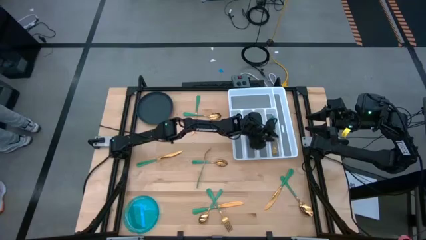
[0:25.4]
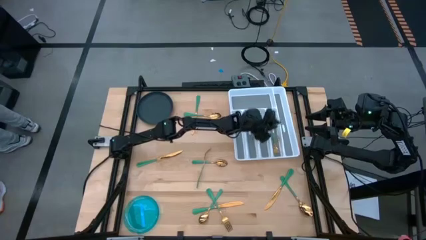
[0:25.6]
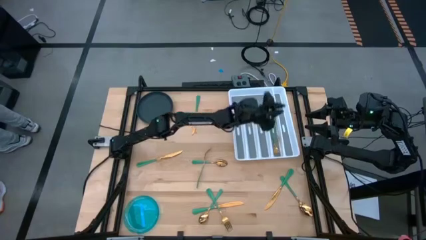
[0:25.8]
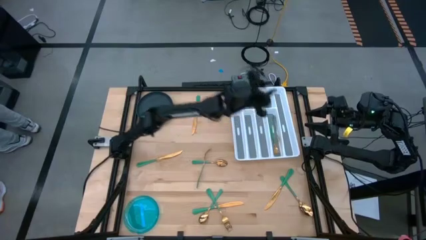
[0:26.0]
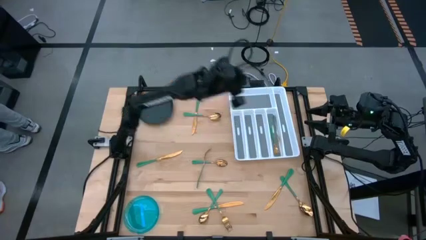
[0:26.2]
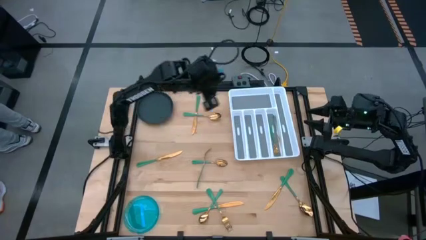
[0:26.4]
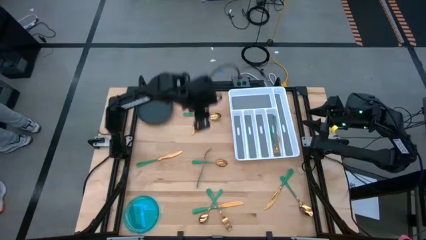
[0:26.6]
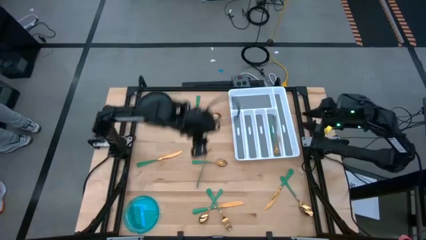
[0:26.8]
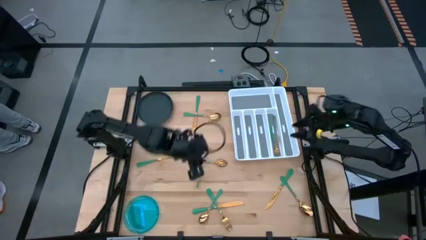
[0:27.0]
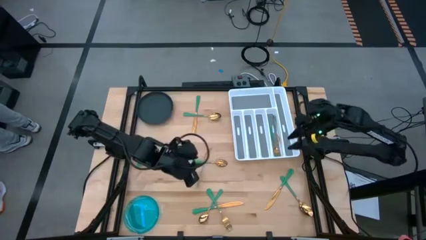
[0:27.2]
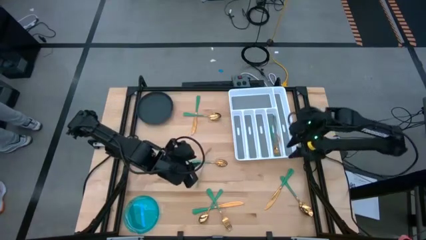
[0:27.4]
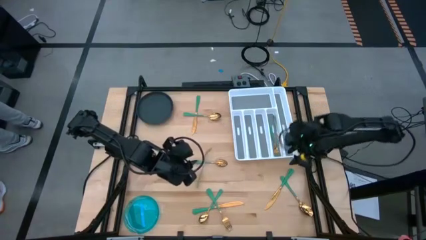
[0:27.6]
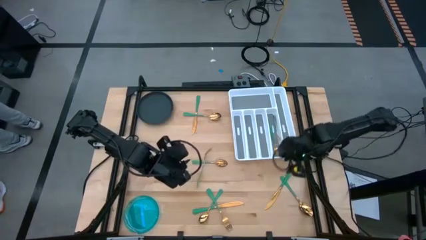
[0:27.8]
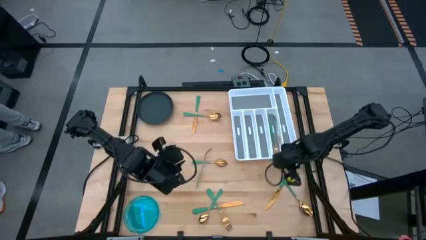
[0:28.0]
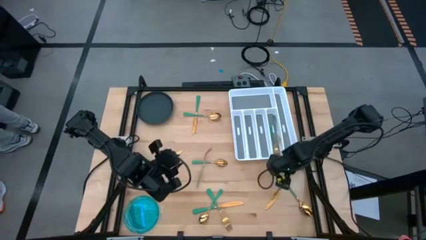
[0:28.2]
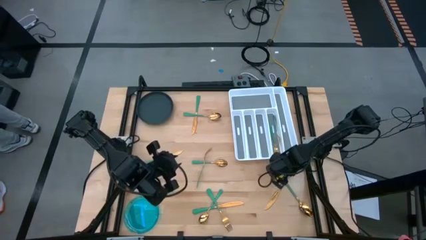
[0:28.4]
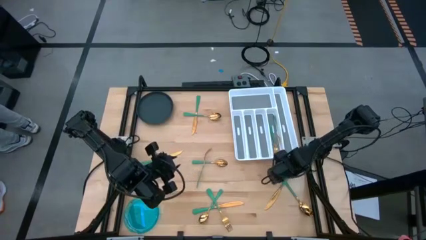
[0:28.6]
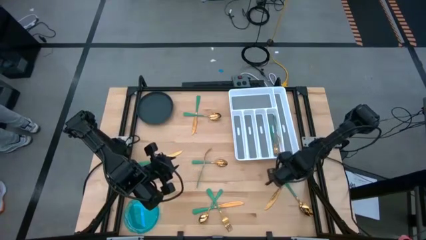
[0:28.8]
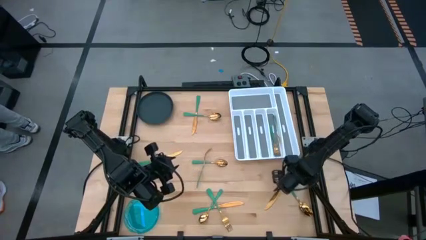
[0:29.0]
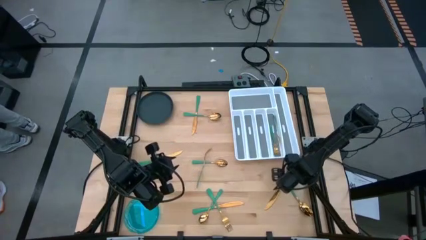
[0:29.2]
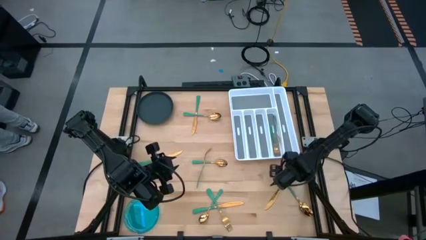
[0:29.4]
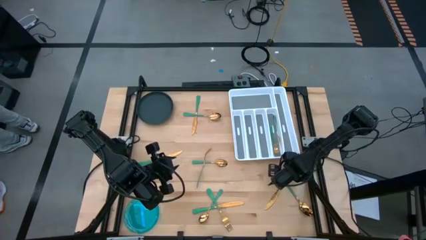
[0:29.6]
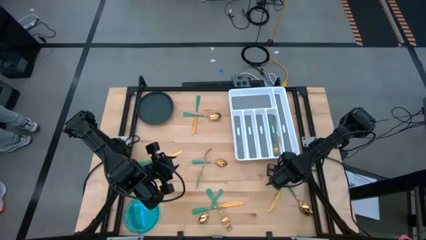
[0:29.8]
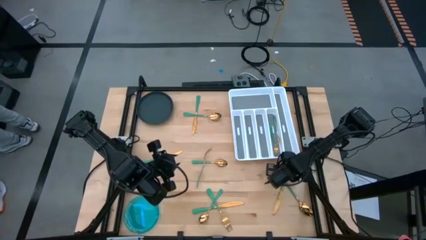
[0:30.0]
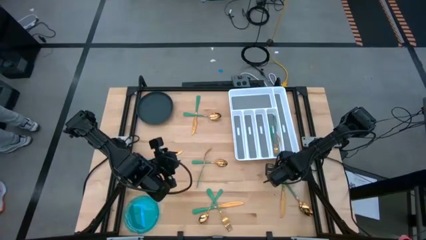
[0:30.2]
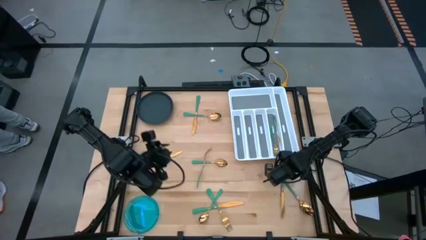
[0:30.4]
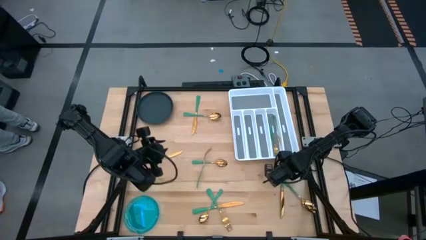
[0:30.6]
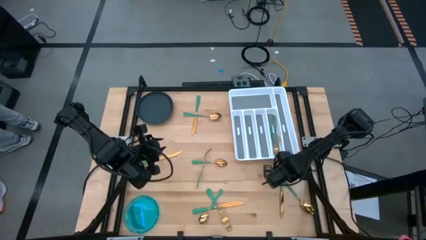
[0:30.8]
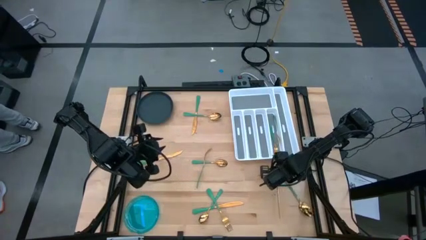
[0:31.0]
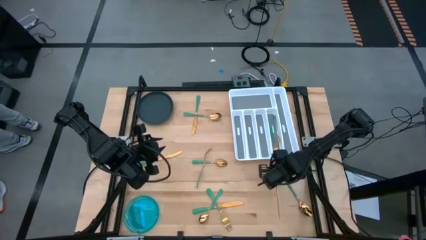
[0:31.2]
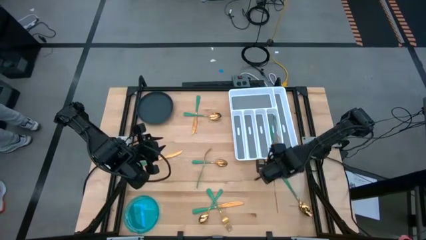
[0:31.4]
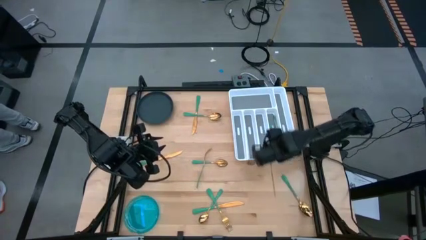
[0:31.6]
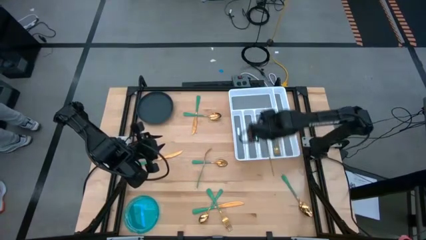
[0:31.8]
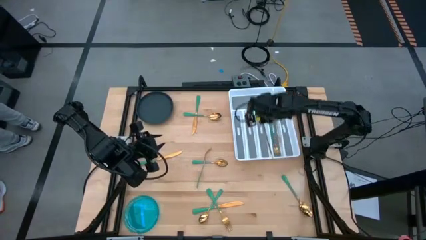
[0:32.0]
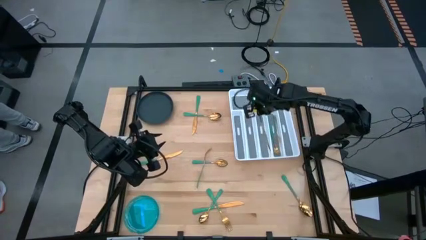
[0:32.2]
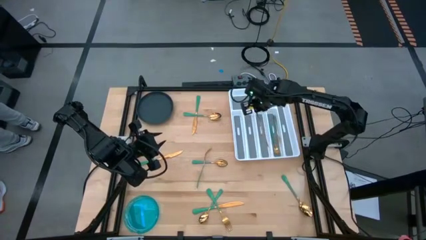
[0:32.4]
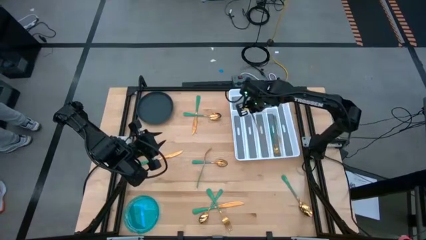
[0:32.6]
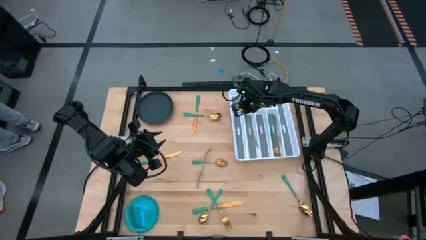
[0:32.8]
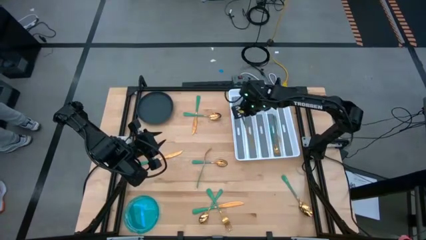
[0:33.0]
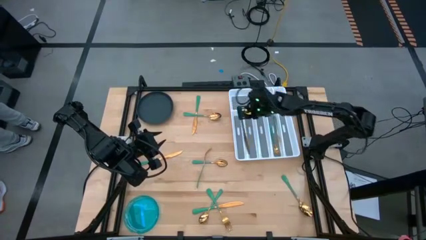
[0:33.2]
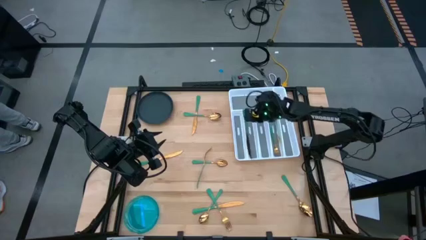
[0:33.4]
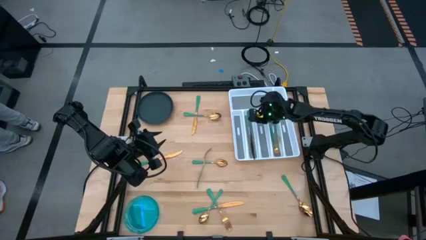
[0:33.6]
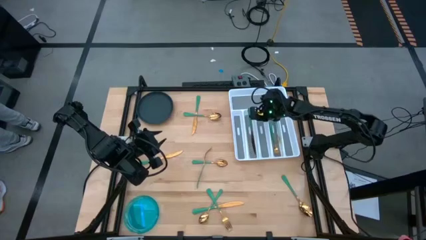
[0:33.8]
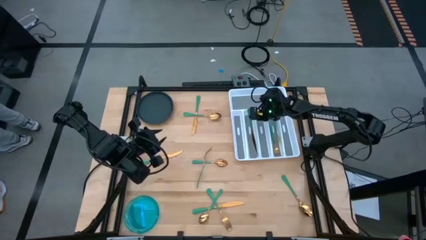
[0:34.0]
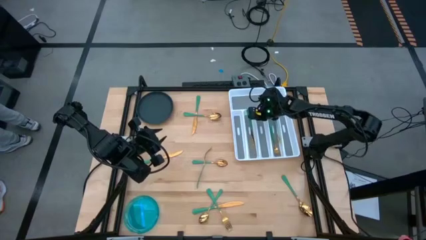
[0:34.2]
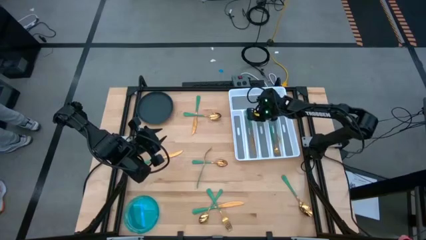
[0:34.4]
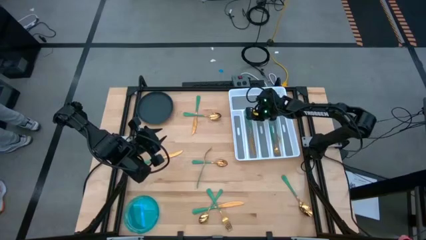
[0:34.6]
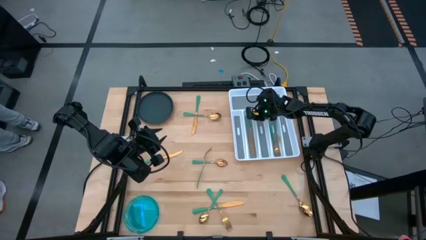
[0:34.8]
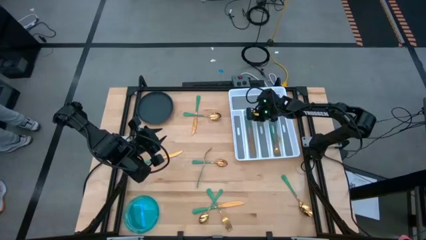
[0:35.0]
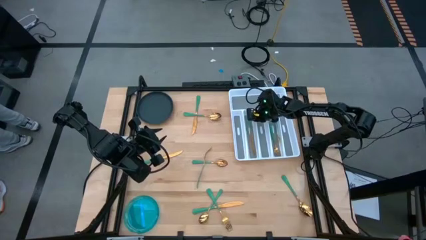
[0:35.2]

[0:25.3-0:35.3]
Task: Sort silverware
Put the bottom right green knife on the silverware tray

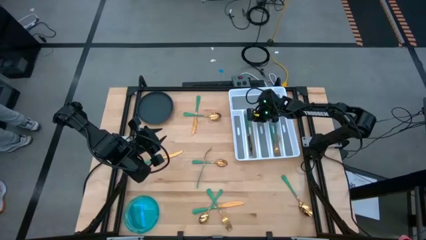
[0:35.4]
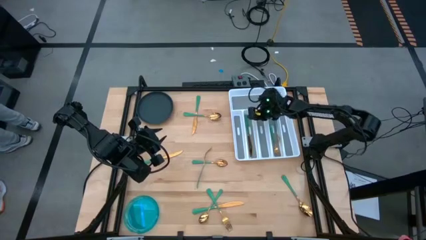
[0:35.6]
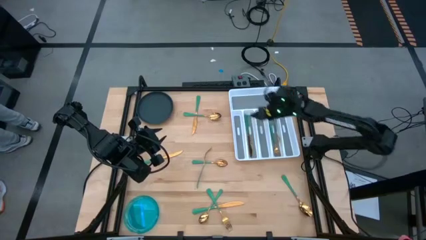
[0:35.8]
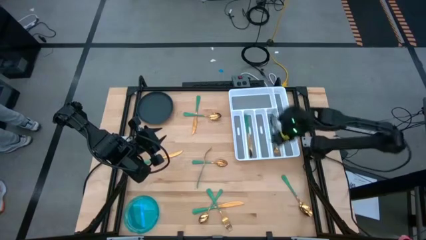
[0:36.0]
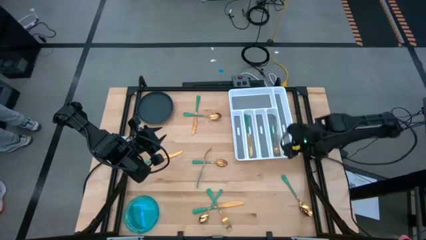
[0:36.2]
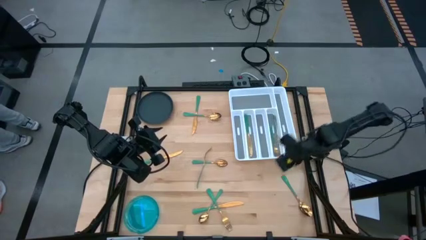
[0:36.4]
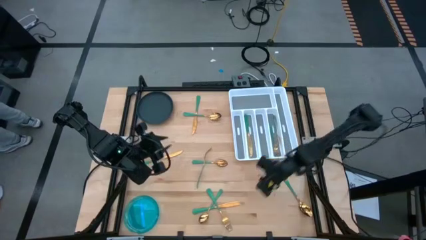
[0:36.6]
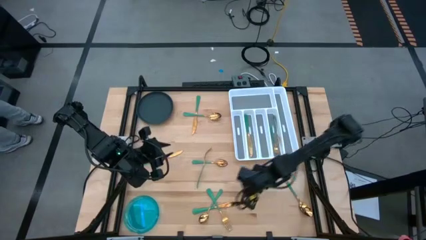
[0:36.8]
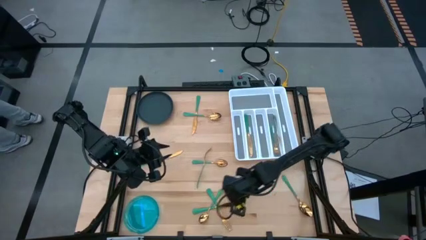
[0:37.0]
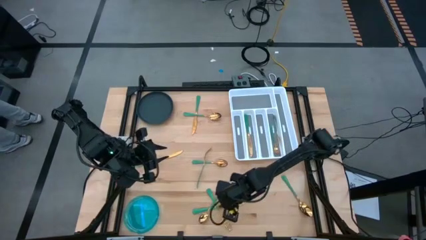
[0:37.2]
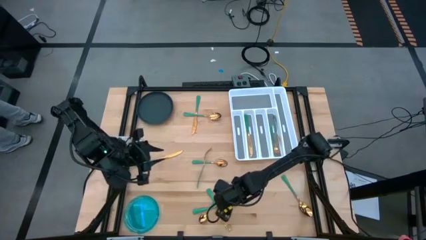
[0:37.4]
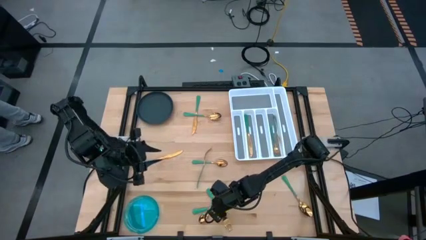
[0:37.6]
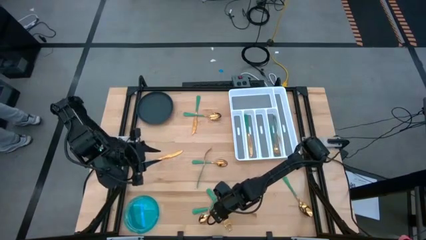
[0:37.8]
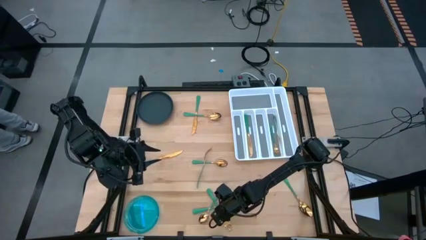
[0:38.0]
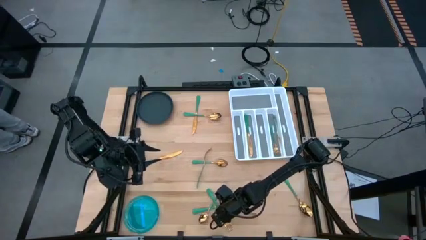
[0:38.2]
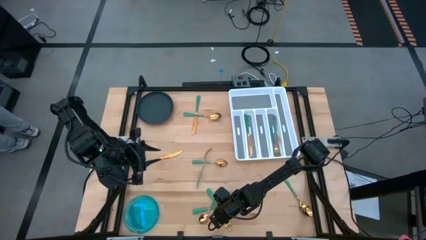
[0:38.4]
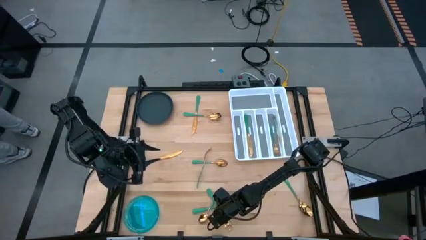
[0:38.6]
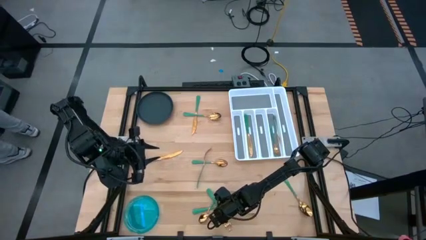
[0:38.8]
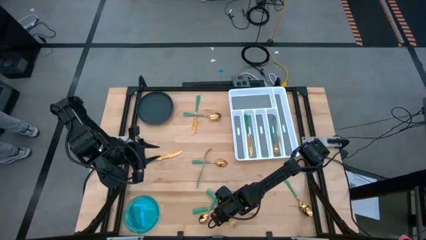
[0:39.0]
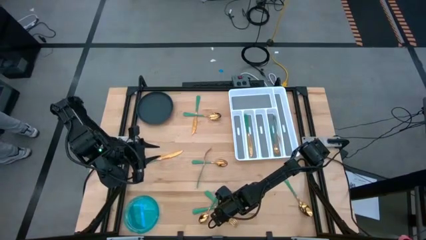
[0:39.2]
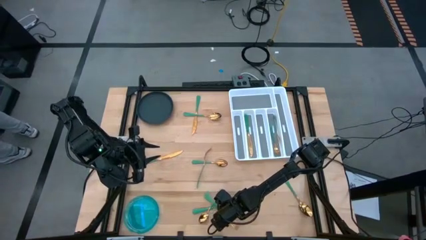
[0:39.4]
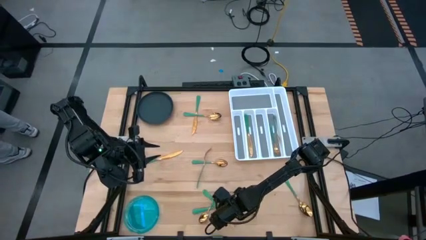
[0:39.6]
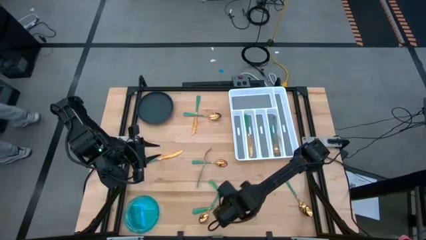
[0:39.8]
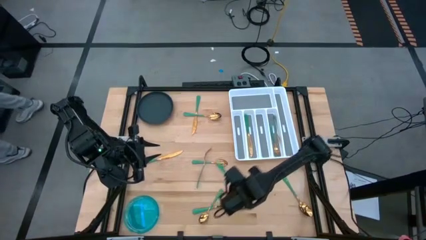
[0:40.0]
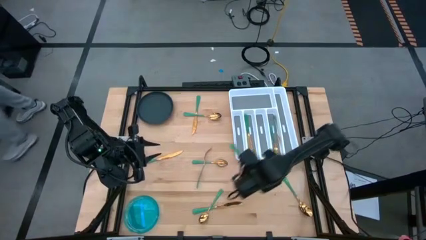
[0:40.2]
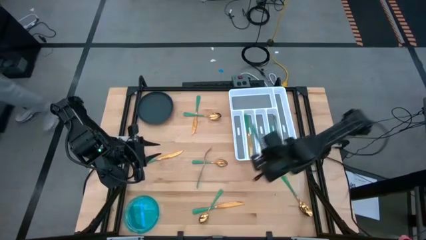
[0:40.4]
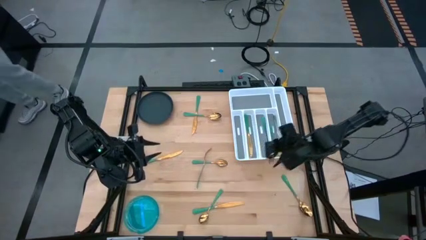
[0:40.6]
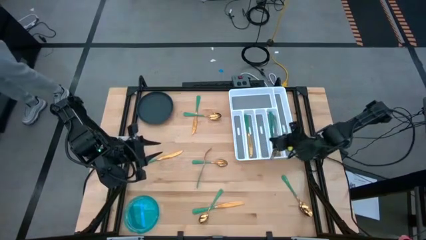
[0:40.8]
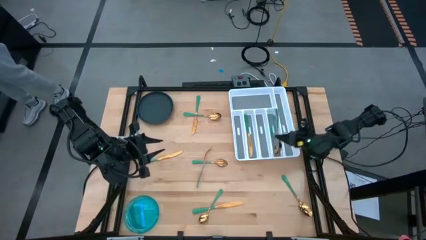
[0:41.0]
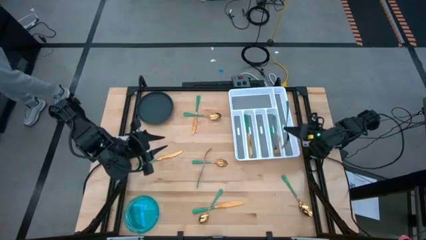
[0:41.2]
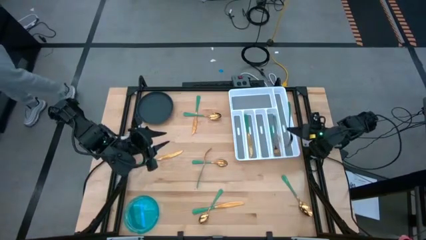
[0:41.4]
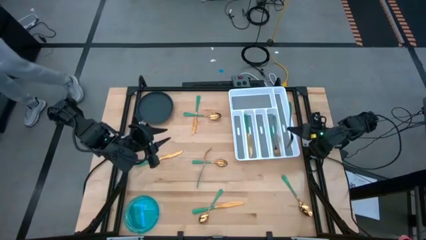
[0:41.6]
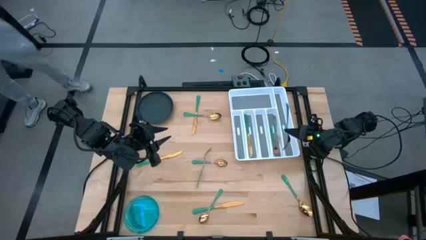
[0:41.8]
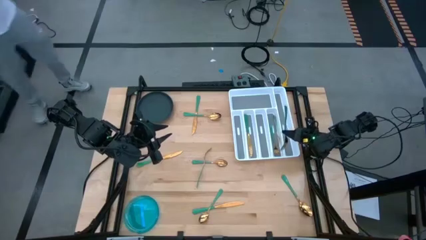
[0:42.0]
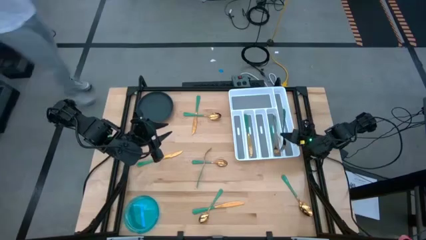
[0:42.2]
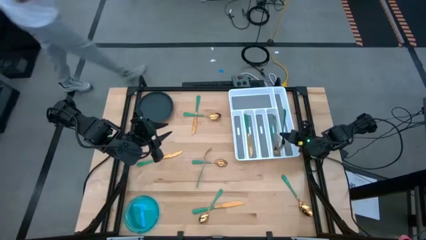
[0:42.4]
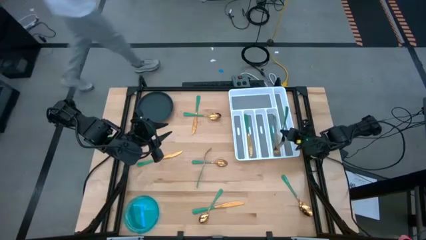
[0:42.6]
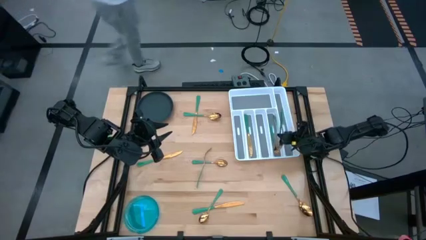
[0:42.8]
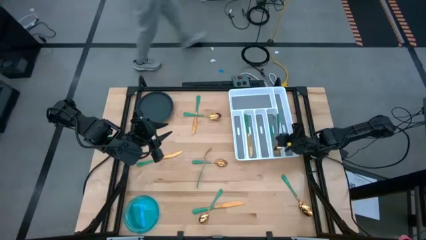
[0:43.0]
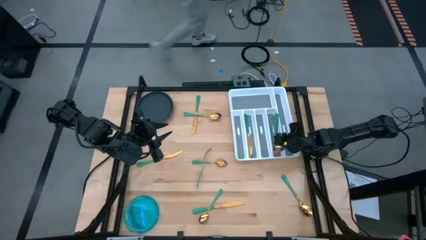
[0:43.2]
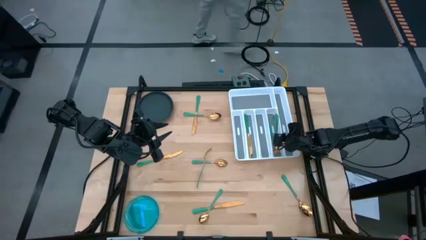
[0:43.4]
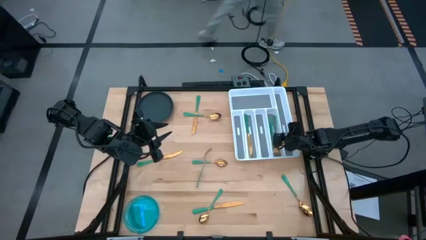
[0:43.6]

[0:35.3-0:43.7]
Put the bottom green fork on the silverware tray with the other green forks
